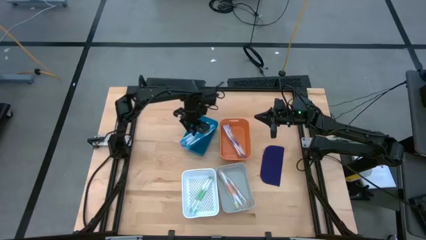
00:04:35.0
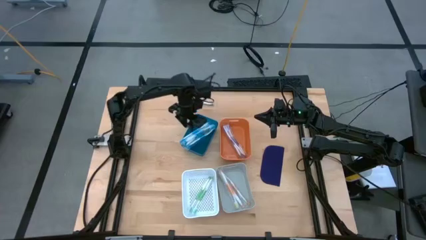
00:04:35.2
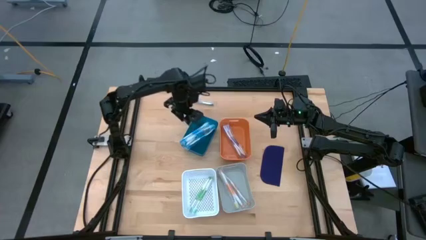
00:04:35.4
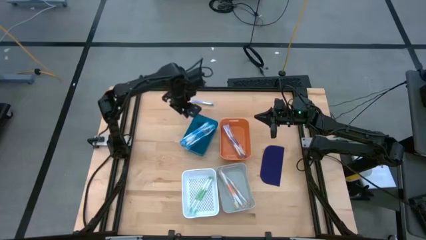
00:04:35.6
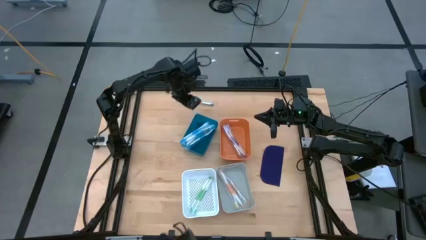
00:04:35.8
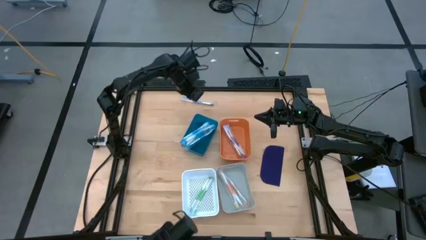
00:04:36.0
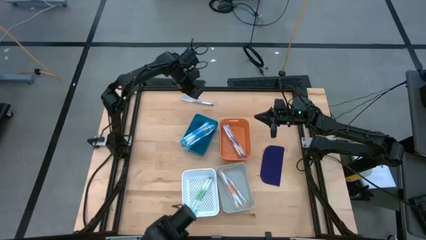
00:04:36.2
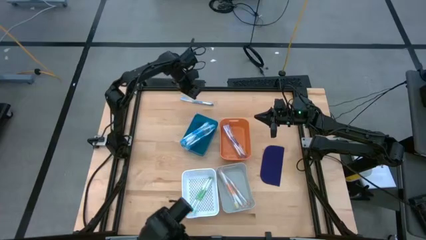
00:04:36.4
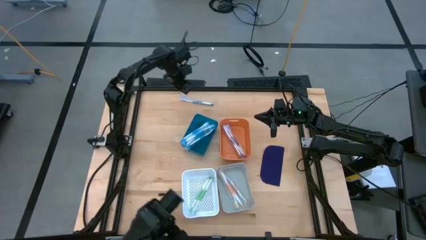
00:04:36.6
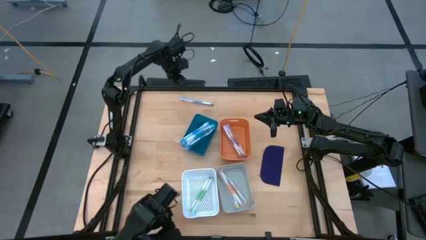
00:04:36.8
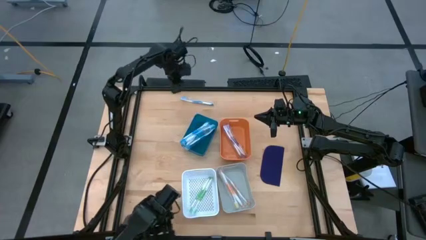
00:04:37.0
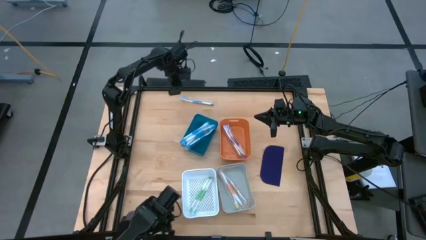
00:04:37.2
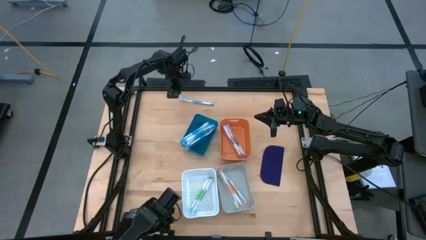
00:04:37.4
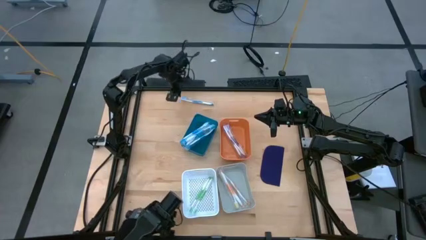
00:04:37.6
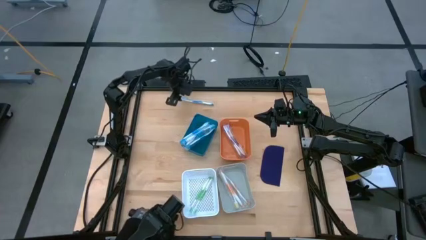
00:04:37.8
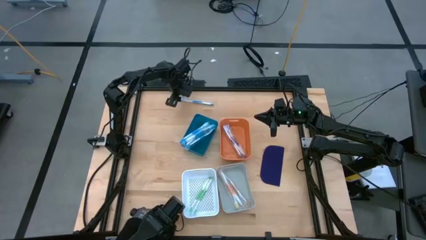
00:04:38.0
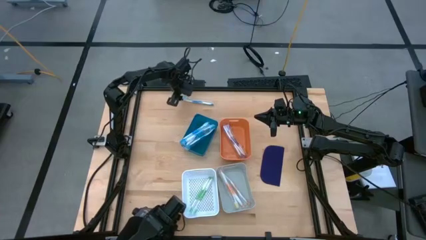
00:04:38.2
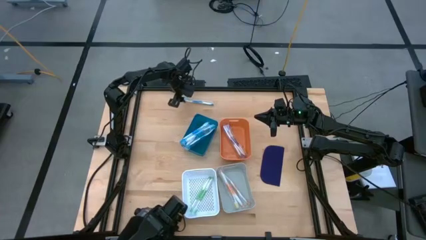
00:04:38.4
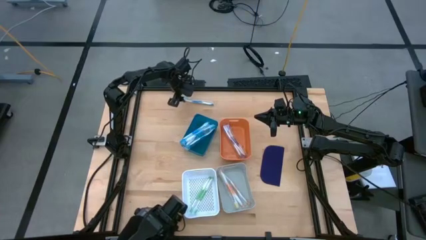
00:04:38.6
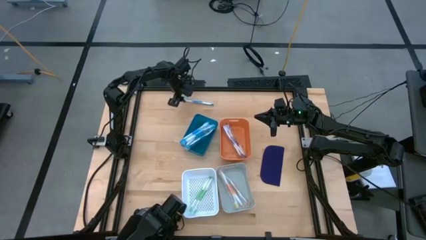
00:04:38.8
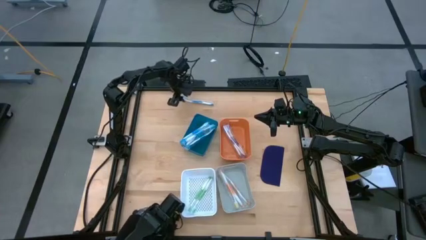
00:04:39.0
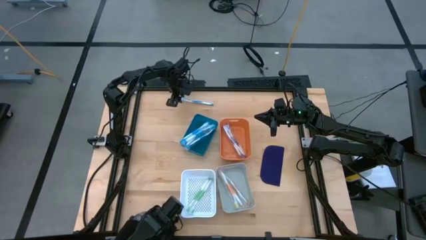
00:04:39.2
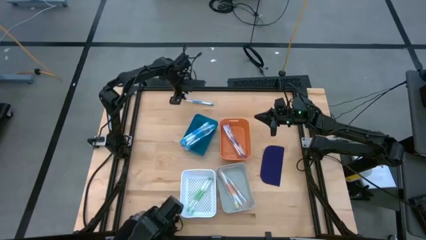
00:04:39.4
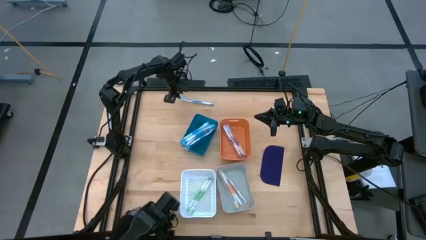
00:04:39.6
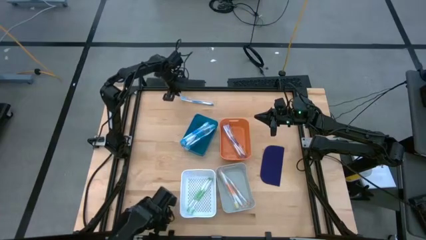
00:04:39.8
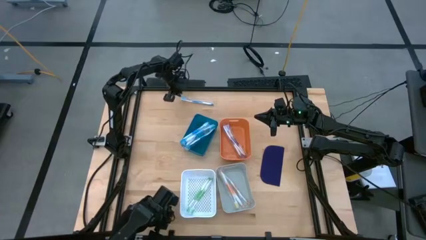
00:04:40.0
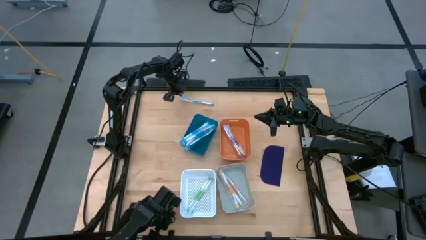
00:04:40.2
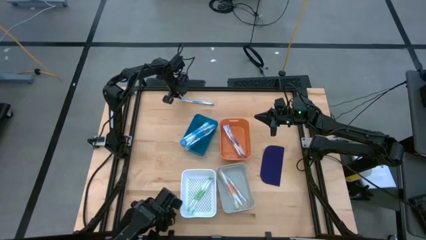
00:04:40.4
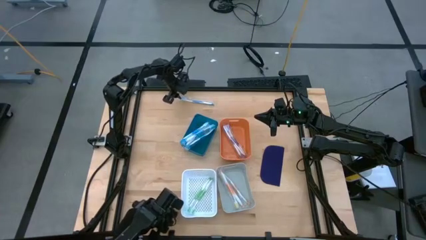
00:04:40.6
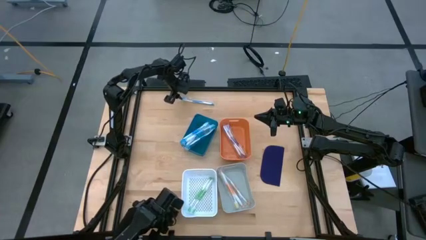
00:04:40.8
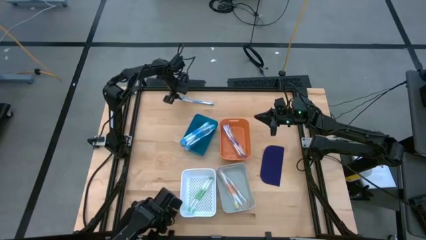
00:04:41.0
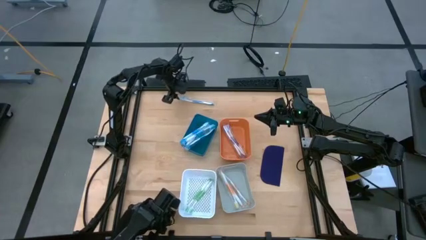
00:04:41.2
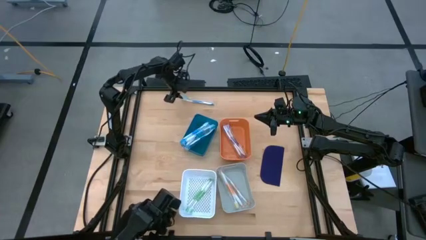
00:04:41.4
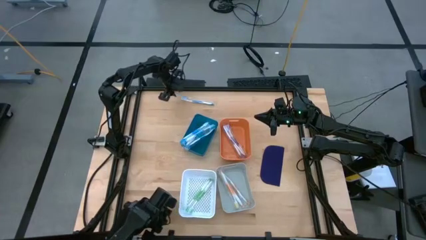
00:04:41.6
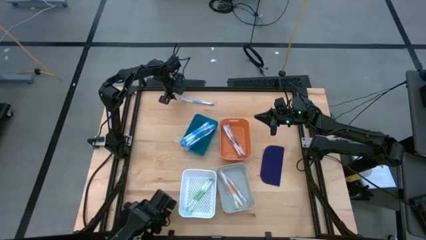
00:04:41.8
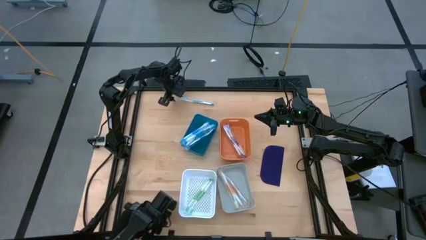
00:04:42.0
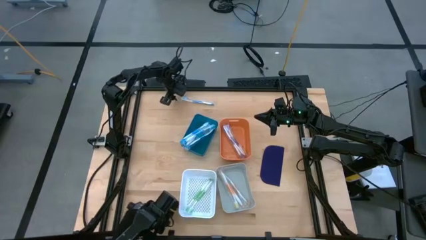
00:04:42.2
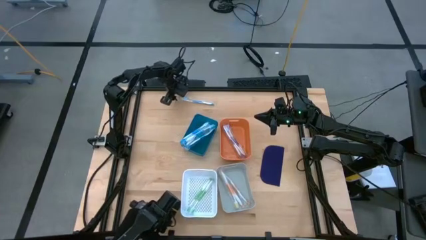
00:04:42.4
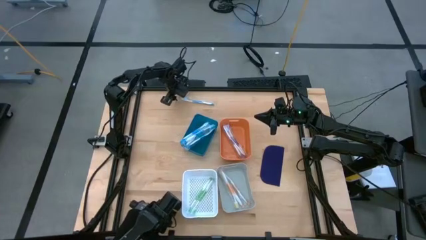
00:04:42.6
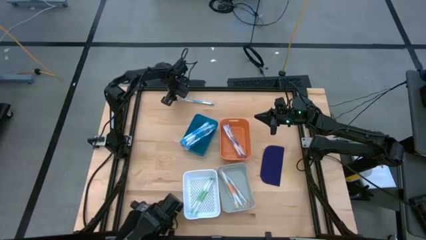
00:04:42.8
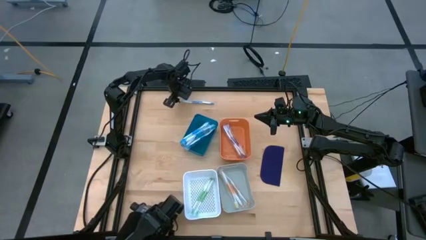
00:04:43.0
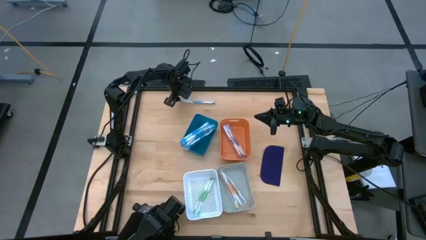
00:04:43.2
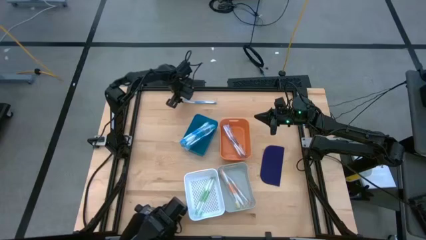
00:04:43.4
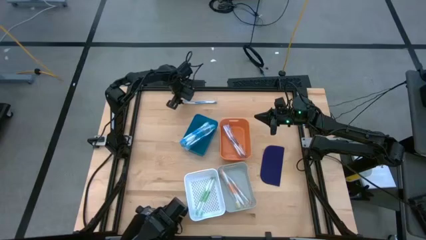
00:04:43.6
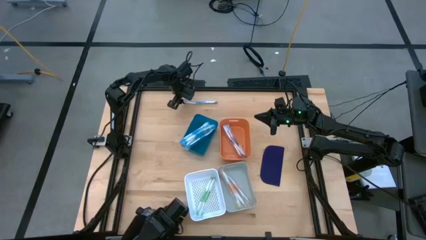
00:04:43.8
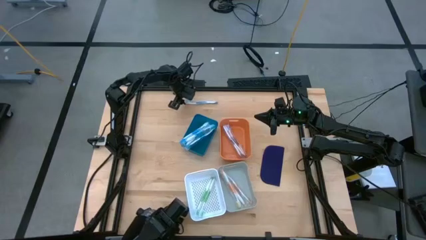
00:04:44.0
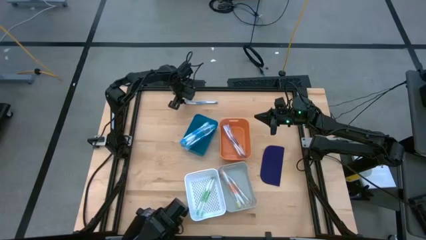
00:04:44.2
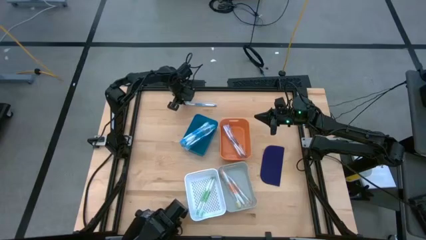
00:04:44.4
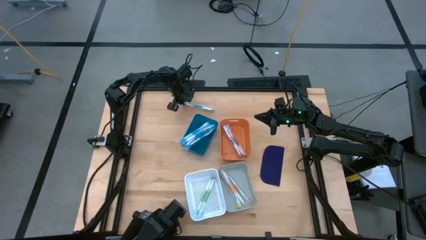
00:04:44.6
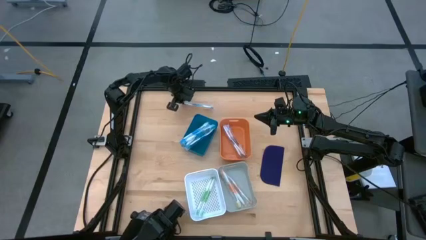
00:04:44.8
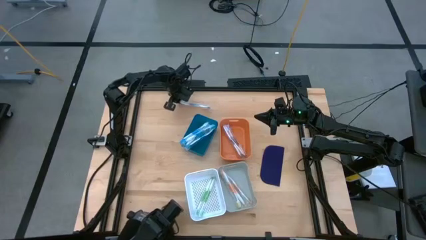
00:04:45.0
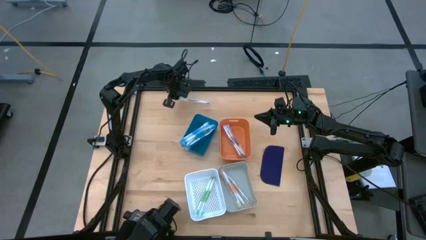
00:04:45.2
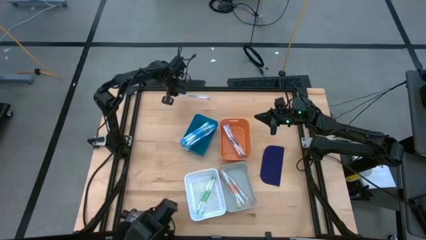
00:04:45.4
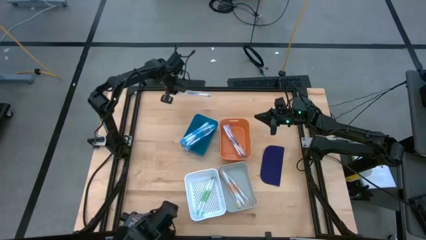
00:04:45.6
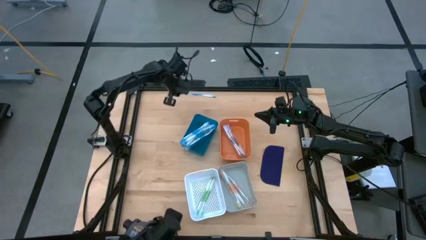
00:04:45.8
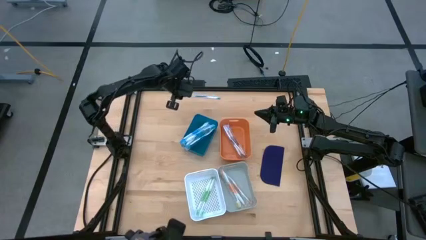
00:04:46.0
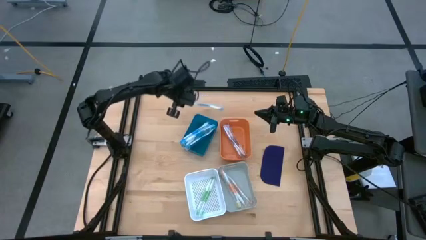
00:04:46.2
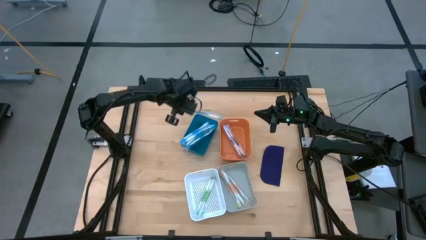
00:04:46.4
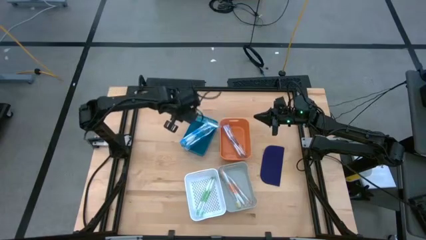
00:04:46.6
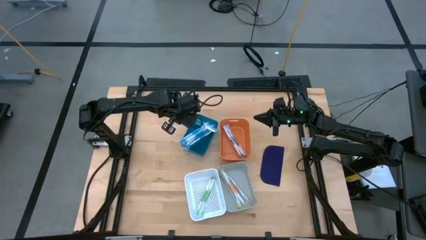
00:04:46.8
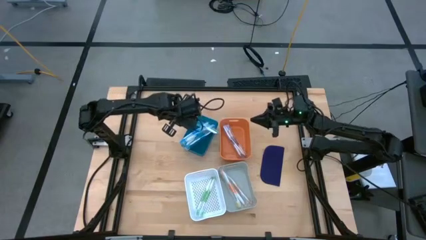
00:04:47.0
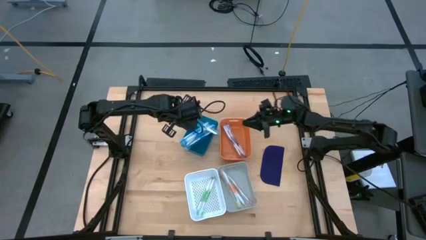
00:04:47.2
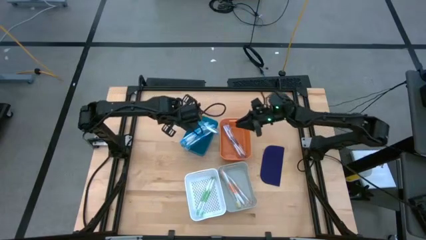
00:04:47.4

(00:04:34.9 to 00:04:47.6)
Task: Pick & Place Toothbrushes
Put the blue toothbrush into the blue bin

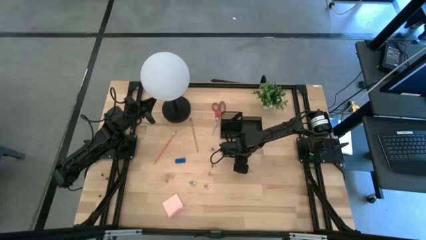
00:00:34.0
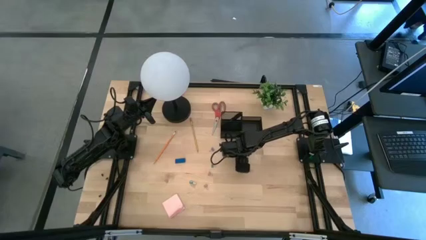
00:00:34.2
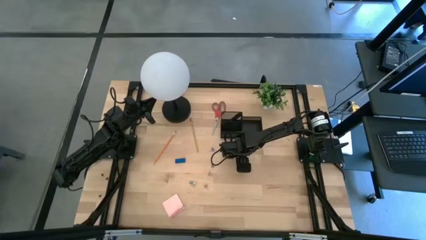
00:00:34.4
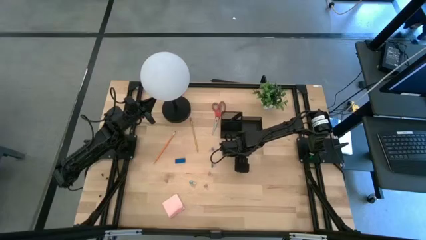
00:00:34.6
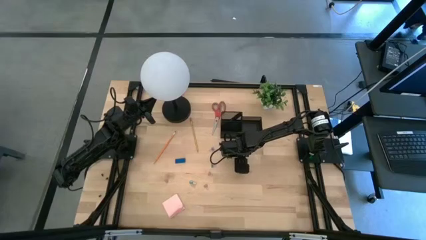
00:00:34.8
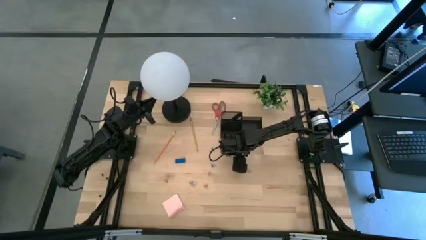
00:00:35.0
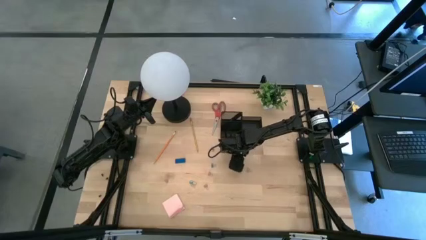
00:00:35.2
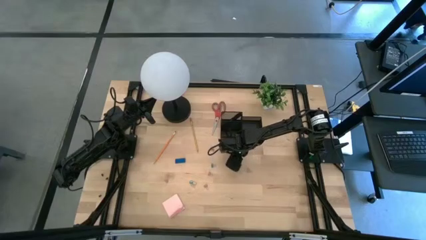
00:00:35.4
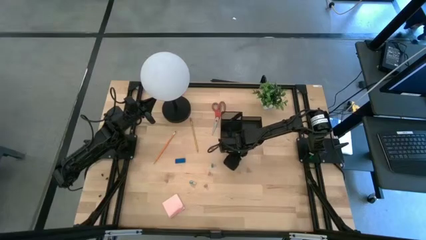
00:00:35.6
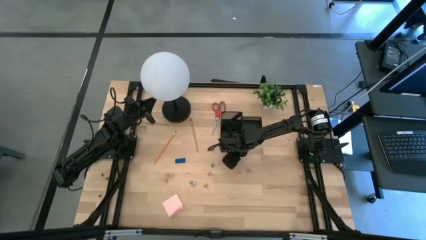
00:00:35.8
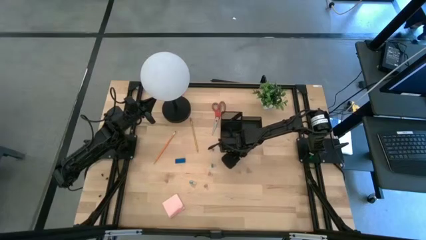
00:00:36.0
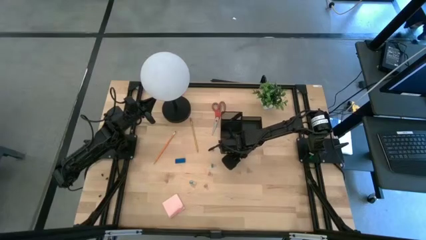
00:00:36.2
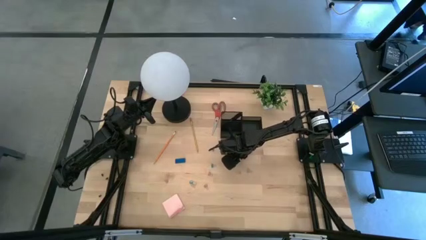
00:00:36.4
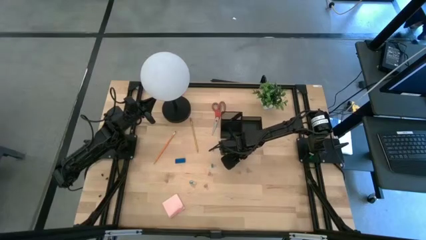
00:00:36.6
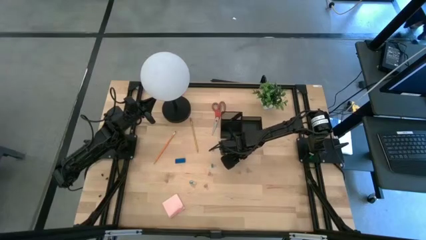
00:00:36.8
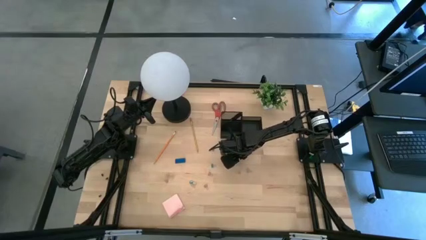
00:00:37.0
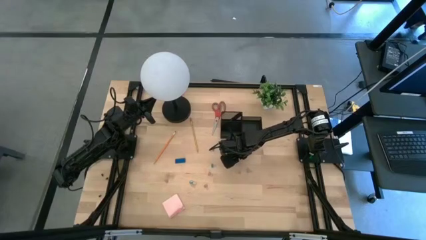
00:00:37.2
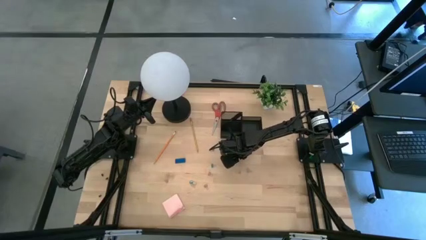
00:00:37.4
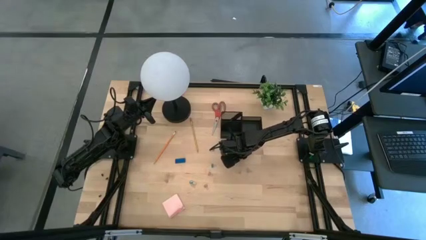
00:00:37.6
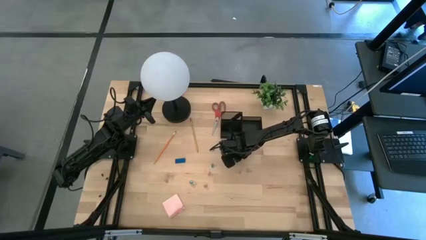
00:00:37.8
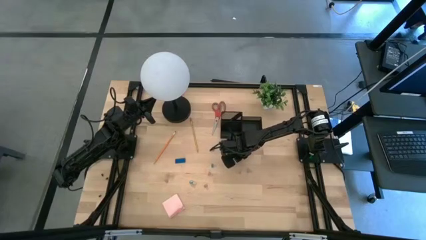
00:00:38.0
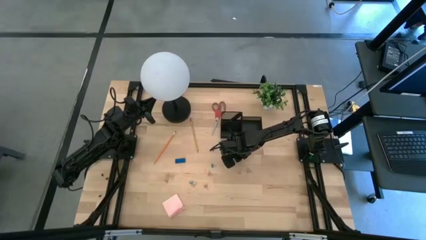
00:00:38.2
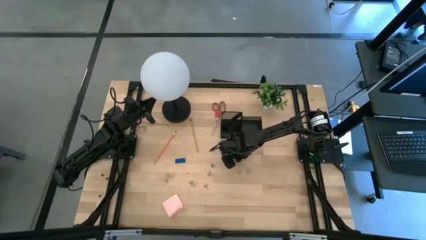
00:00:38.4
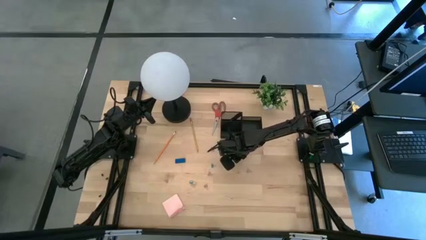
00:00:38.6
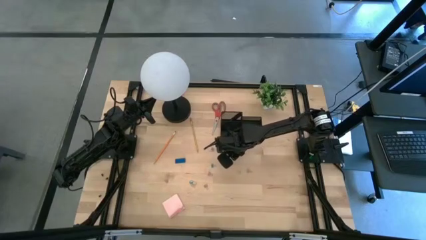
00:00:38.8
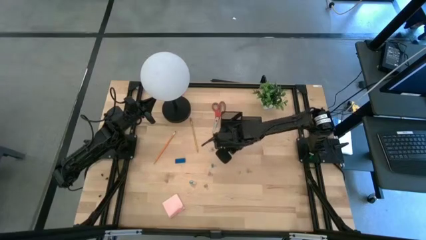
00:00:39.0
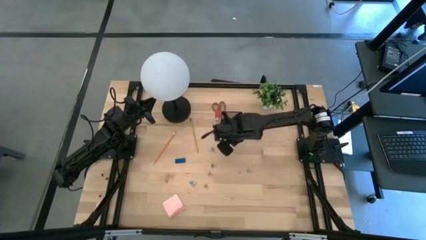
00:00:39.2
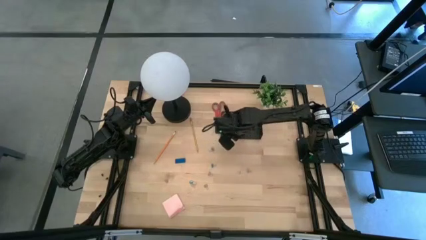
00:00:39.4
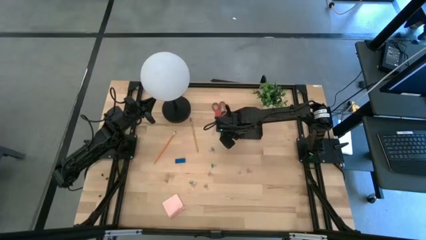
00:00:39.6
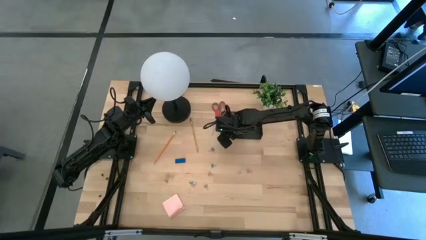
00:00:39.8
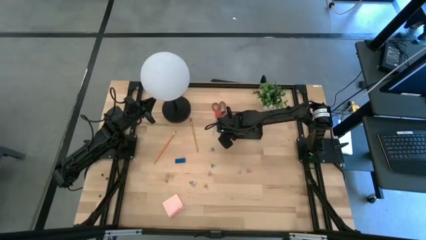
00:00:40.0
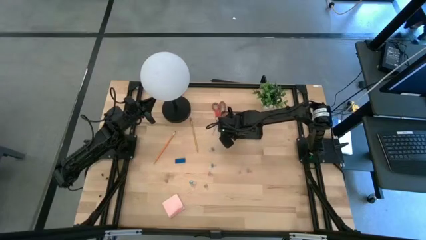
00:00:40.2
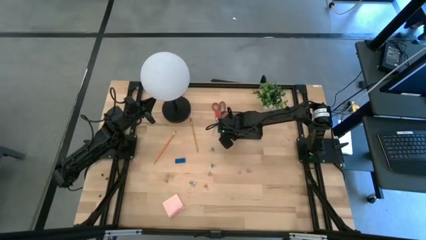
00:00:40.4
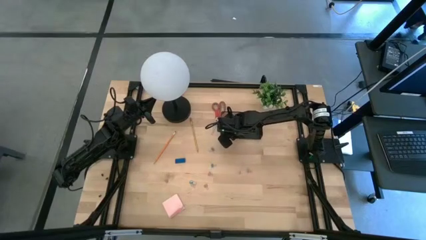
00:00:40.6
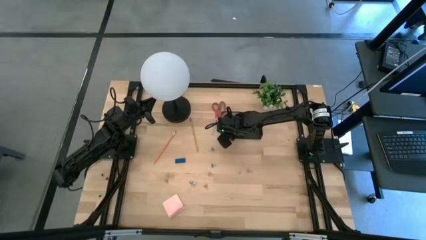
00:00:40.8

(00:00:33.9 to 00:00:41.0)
Task: Pick and place office supplies into organizer
Put the blue clip binder into the black desk organizer
